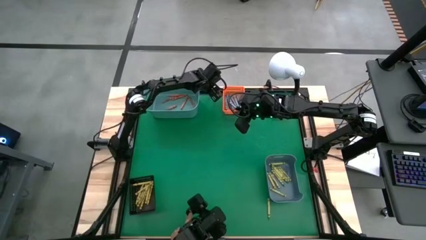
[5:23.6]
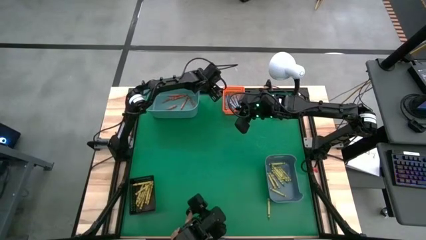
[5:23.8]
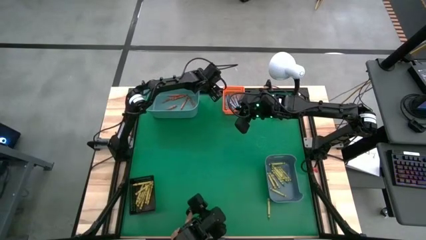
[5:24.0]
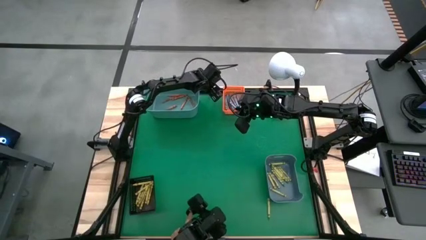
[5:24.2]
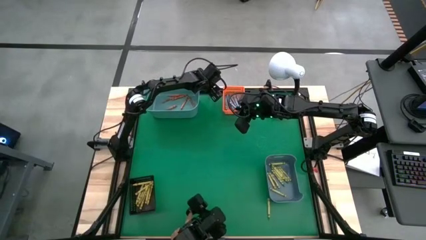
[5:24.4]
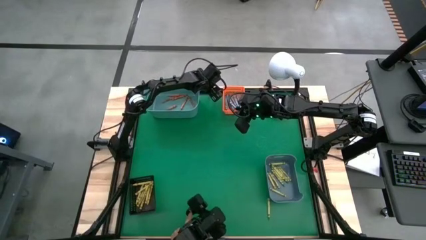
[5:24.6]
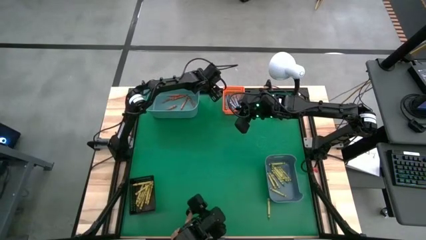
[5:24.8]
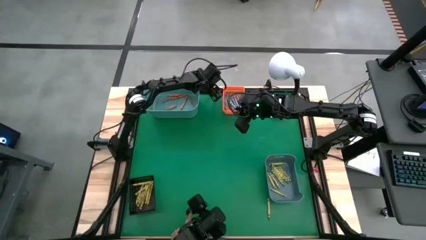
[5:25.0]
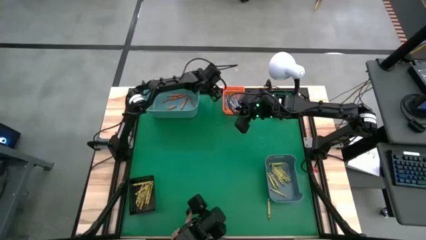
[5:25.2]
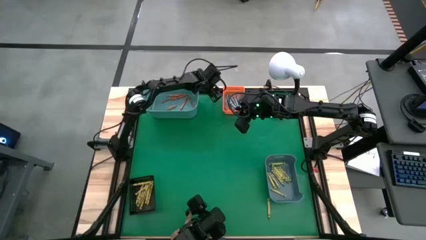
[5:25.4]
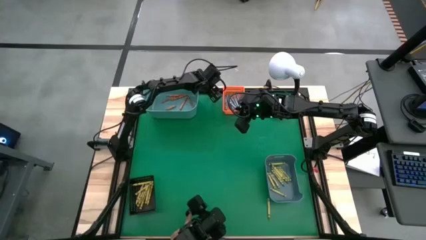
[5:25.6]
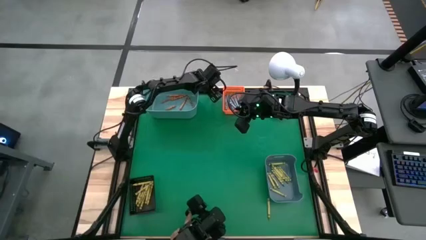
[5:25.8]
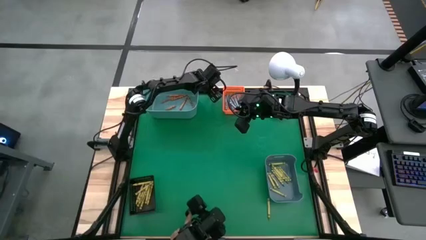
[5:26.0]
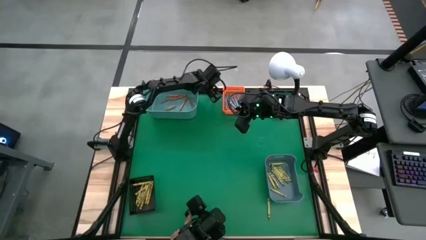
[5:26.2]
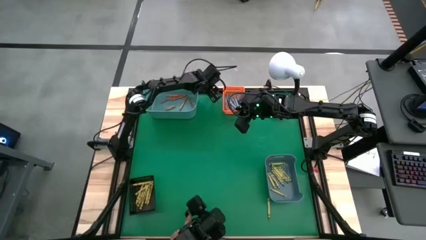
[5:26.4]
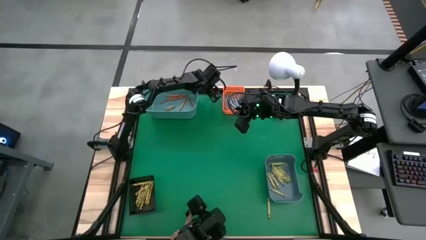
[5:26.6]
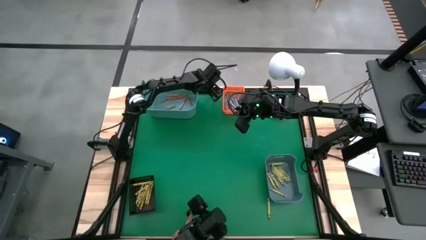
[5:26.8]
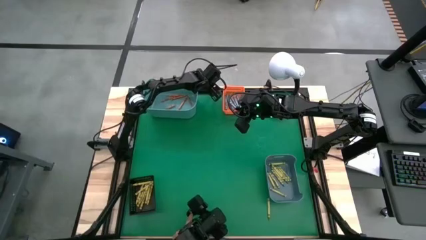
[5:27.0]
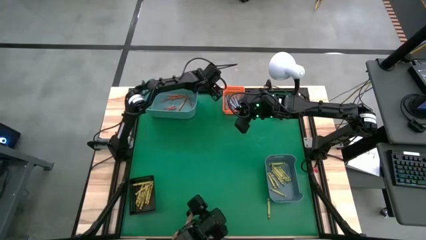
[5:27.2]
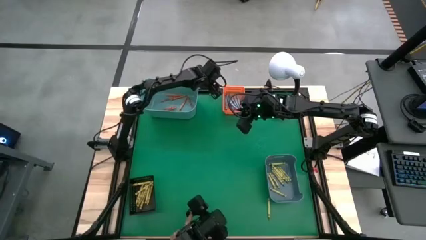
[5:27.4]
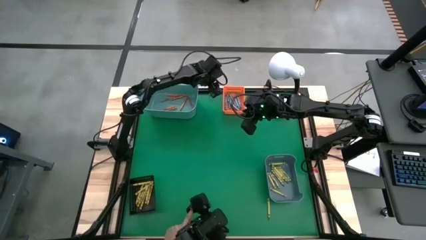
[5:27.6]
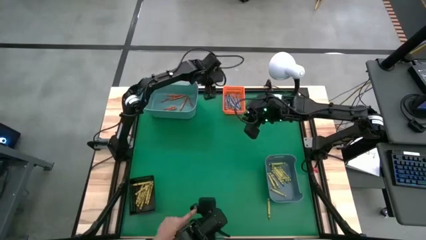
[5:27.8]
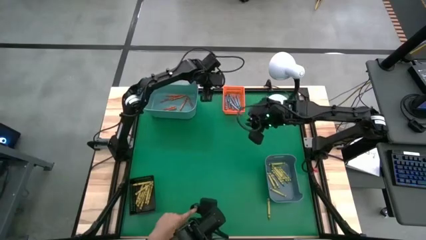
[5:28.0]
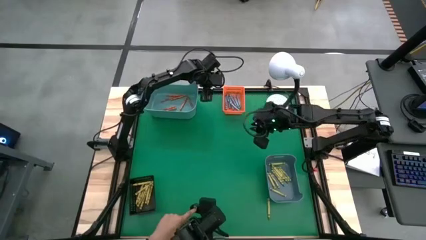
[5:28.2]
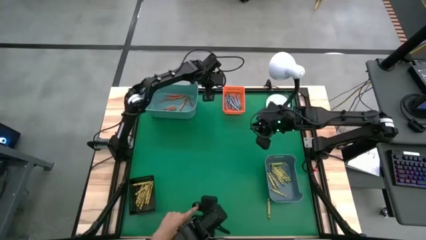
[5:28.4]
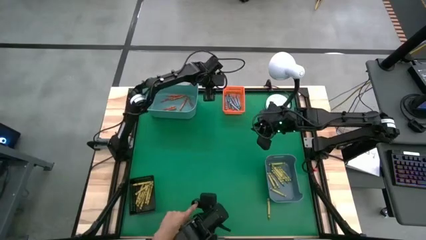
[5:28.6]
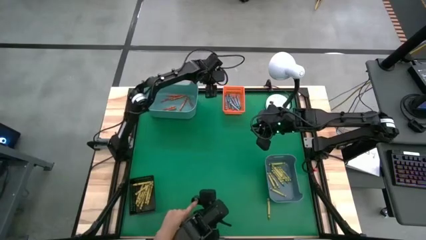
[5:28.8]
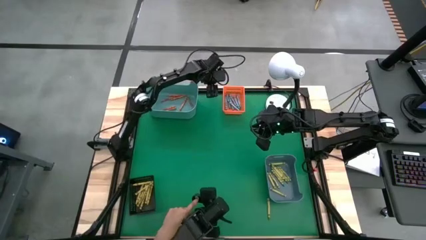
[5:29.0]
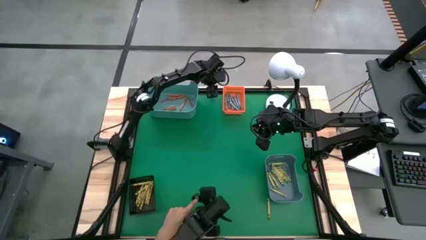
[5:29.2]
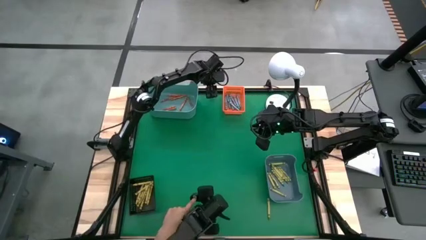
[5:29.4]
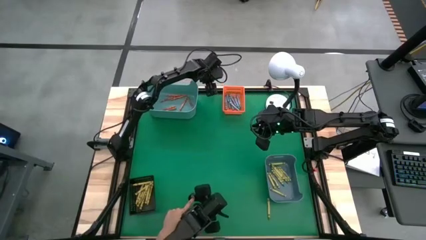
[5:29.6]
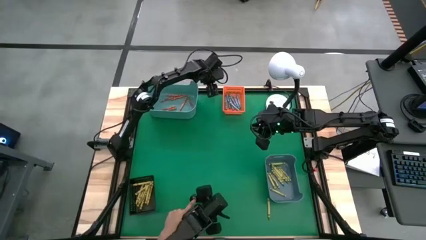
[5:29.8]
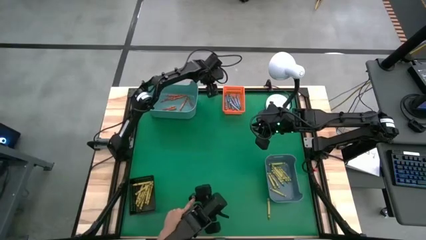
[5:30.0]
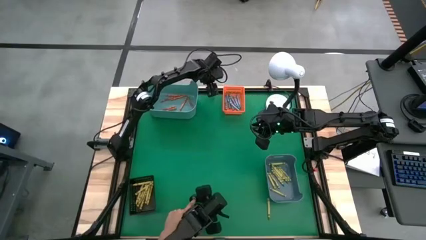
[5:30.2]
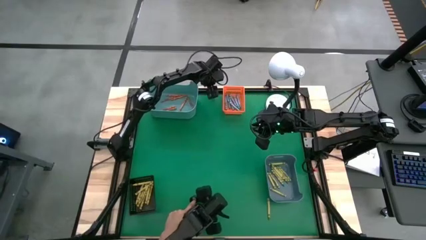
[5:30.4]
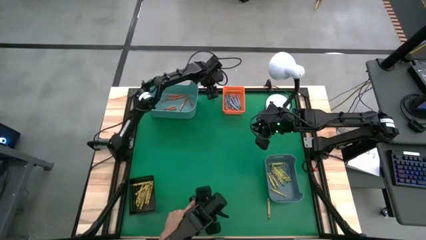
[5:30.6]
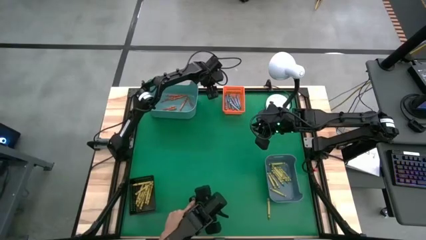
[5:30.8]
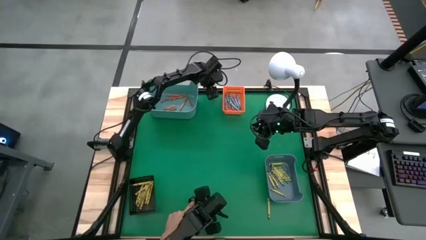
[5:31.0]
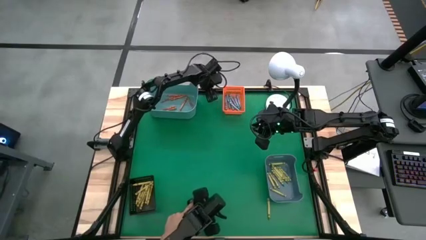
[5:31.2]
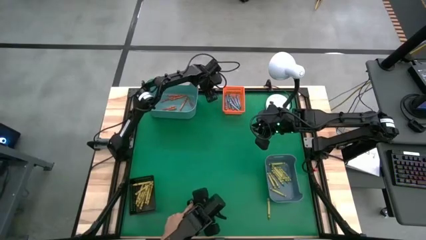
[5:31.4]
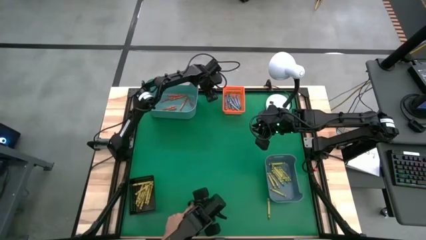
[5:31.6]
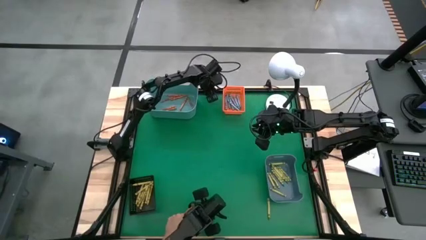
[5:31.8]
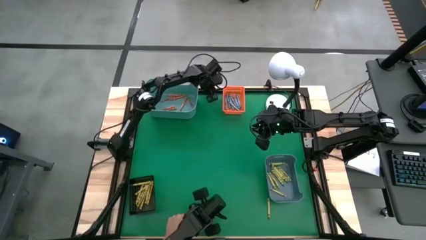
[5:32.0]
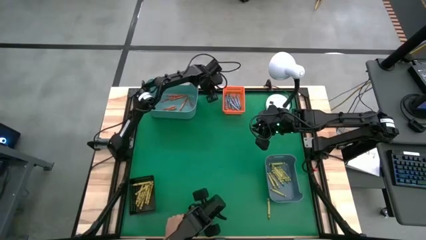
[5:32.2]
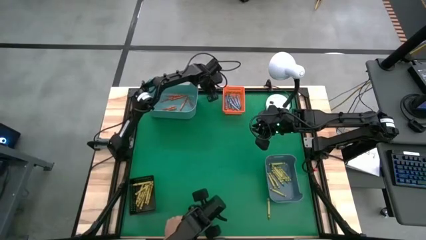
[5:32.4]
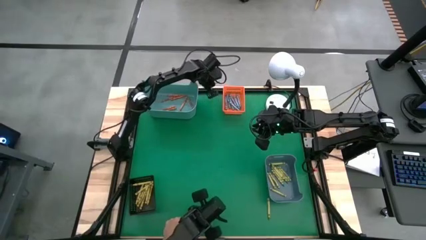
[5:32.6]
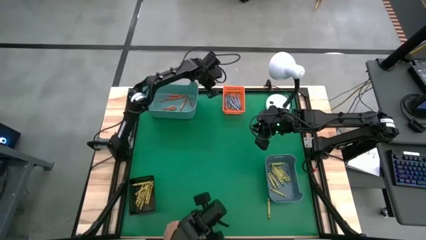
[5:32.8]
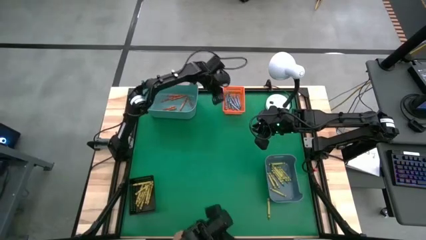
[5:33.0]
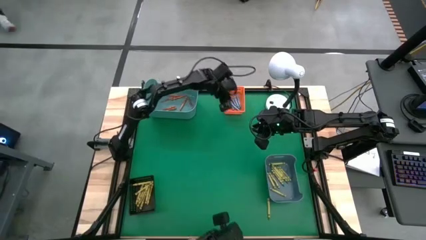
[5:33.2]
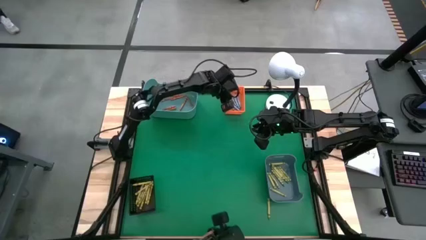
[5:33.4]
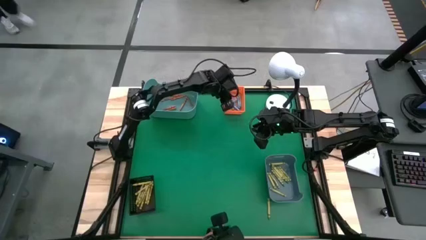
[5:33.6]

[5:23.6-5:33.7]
Task: Sort crayons
Put the blue crayon into the orange bin

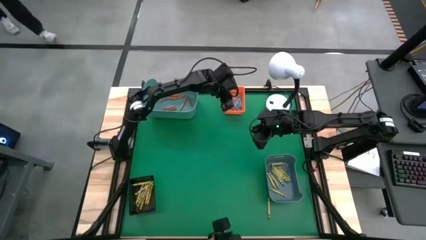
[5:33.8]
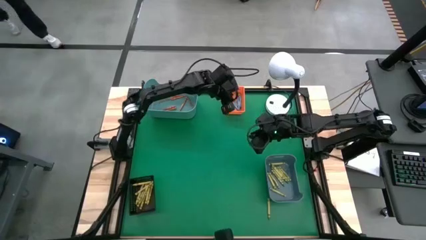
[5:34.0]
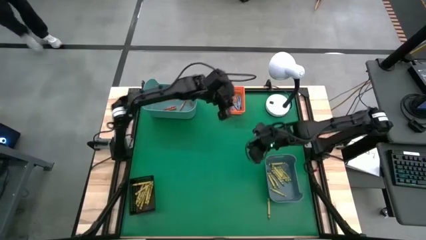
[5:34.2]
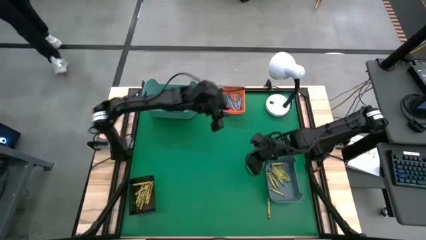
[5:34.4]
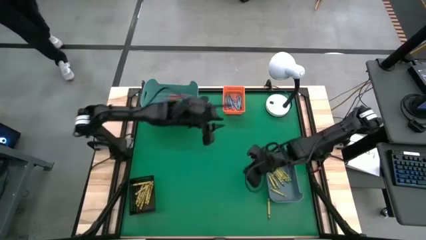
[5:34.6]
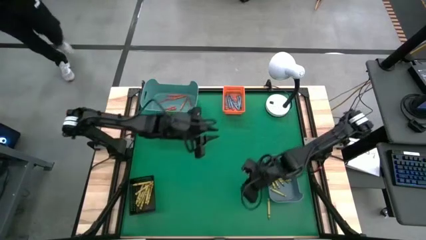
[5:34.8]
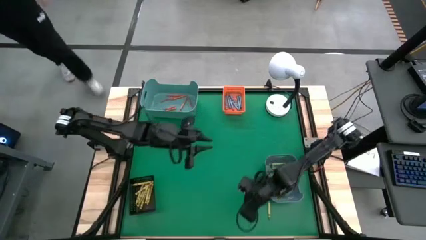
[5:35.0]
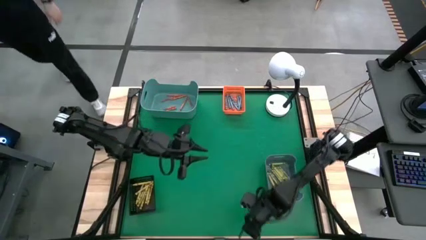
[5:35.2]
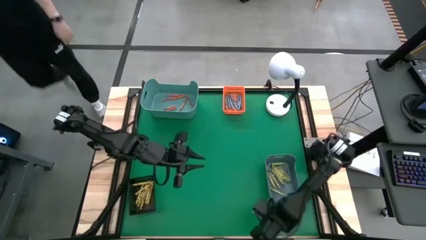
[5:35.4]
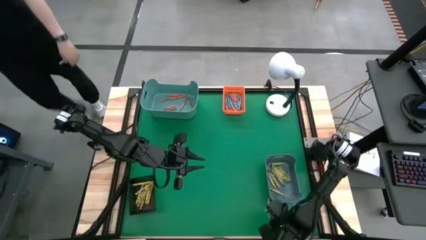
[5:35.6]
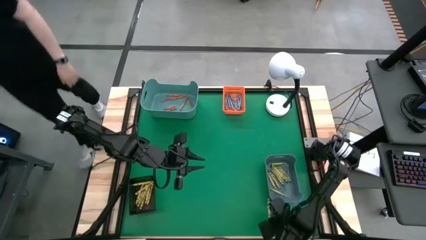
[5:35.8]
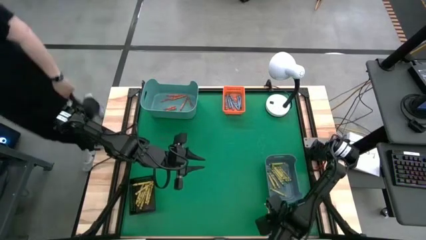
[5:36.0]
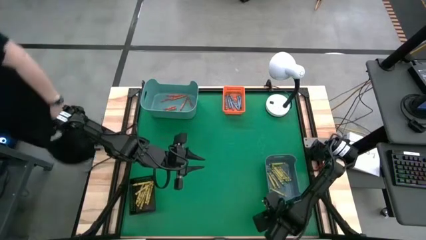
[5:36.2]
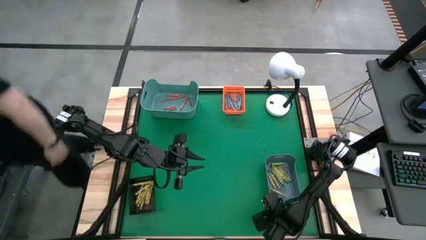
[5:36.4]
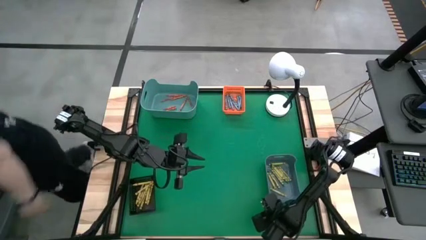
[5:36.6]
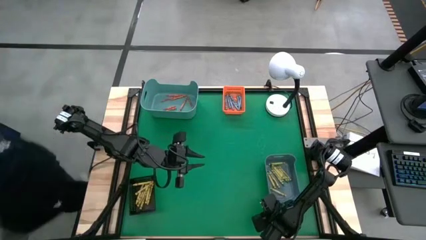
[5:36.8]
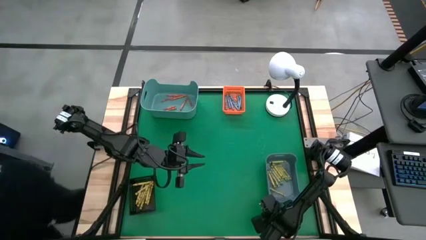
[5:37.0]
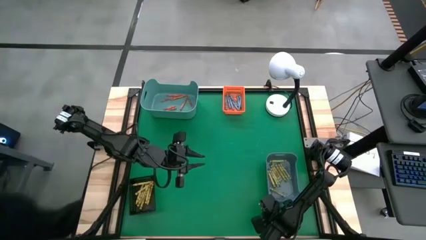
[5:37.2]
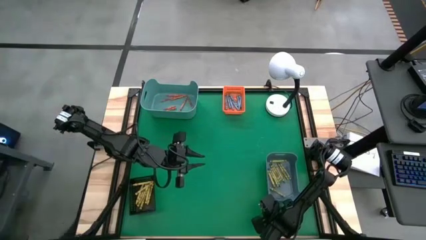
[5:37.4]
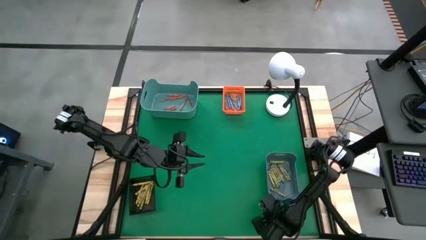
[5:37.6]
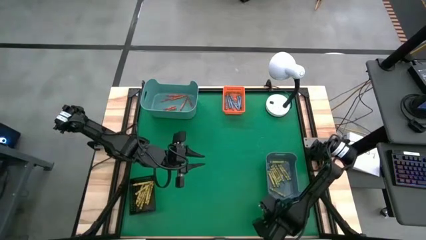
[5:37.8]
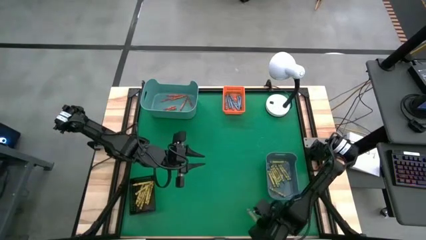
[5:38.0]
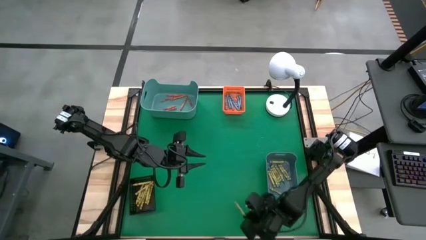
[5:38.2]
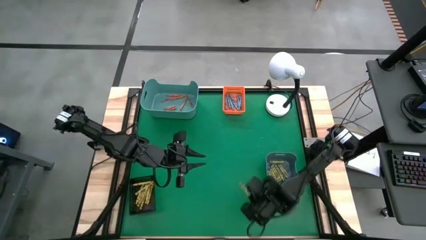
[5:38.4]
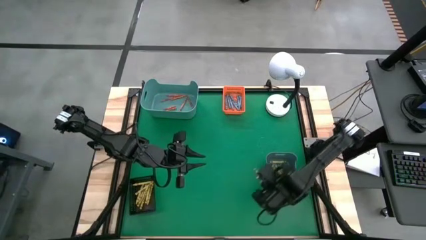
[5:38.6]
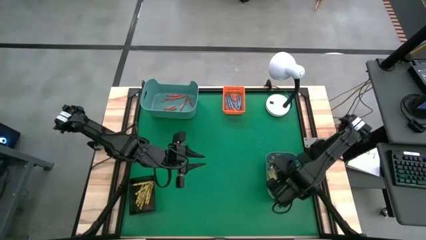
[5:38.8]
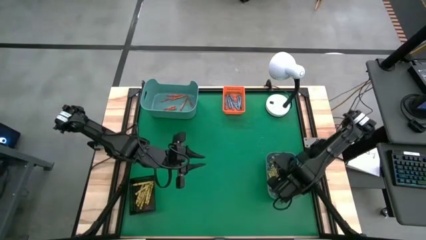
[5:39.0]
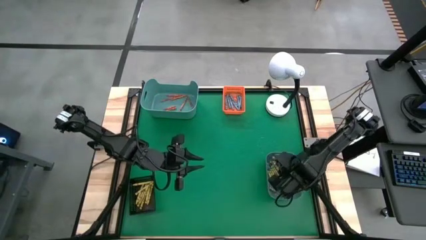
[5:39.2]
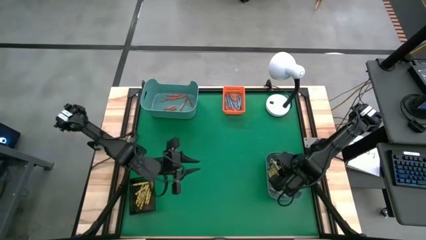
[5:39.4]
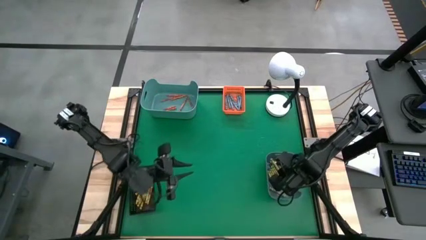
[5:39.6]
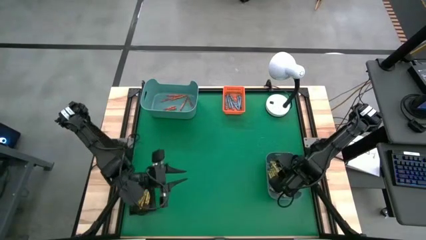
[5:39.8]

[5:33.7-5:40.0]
Put the green crayon into the blue bin
